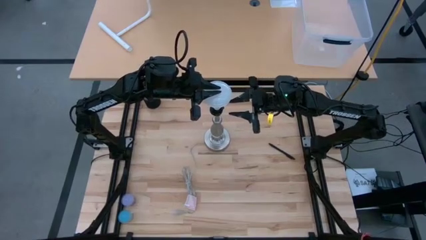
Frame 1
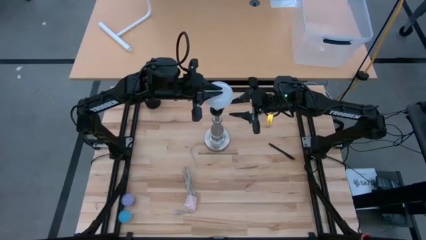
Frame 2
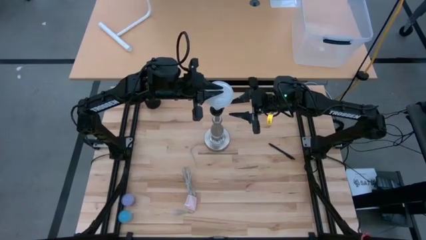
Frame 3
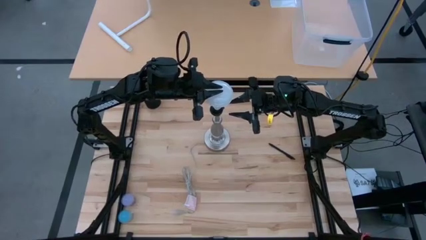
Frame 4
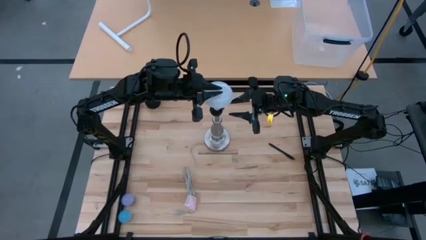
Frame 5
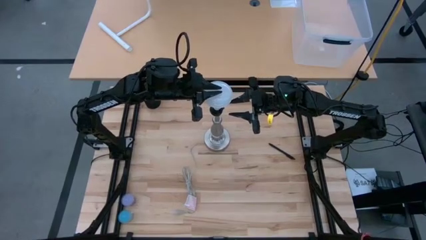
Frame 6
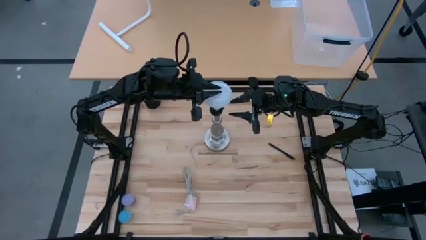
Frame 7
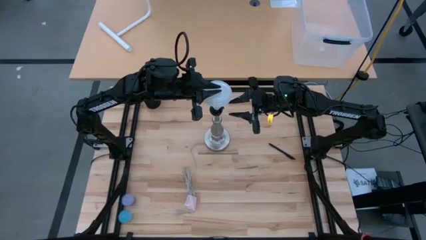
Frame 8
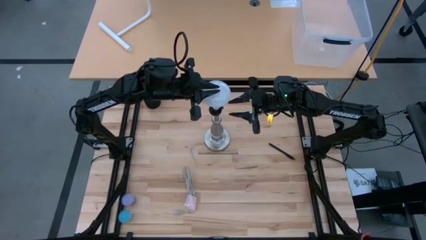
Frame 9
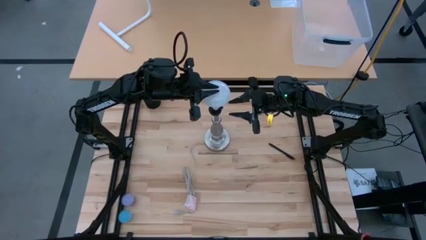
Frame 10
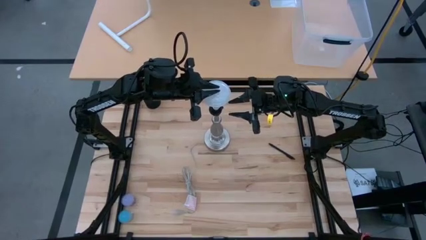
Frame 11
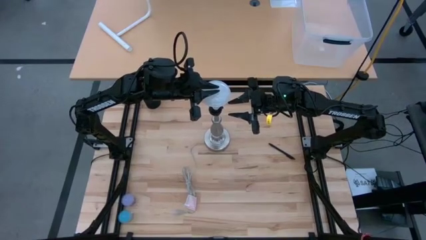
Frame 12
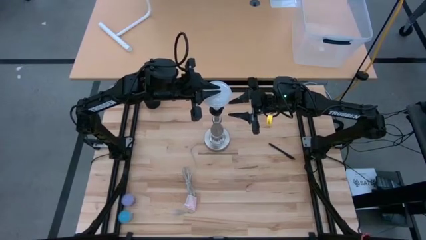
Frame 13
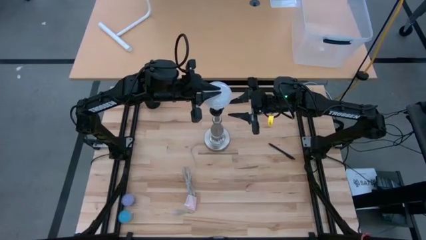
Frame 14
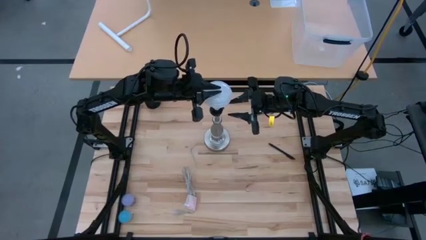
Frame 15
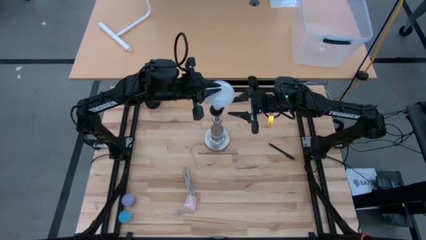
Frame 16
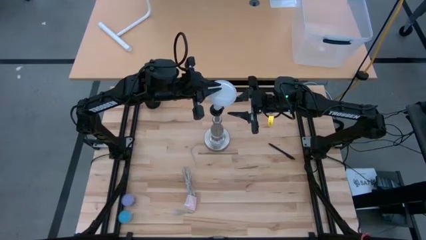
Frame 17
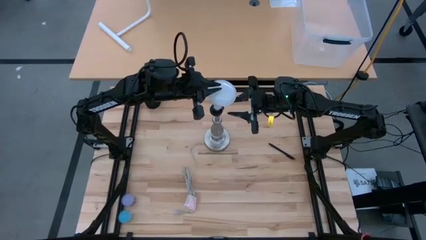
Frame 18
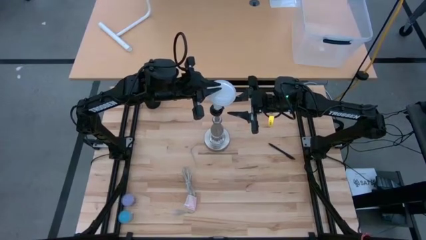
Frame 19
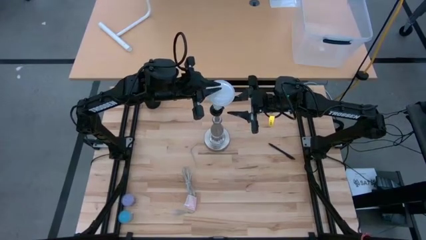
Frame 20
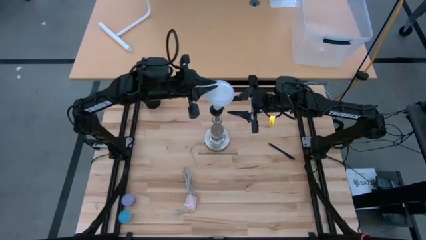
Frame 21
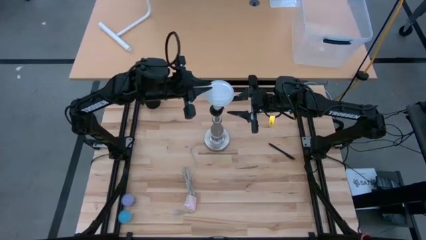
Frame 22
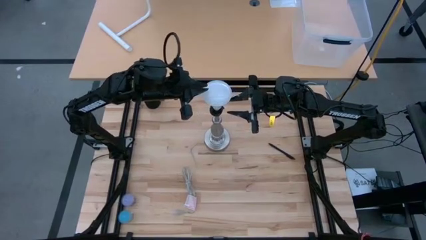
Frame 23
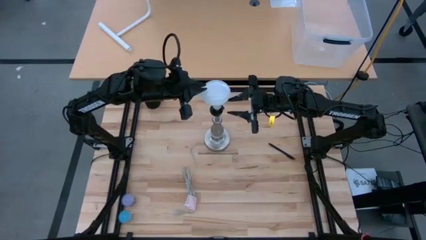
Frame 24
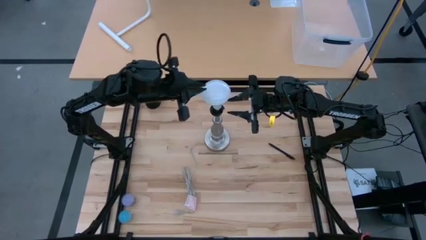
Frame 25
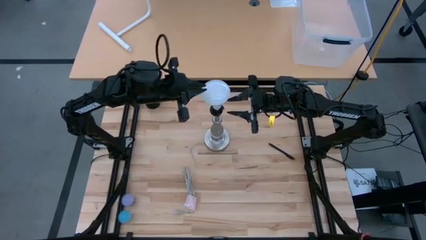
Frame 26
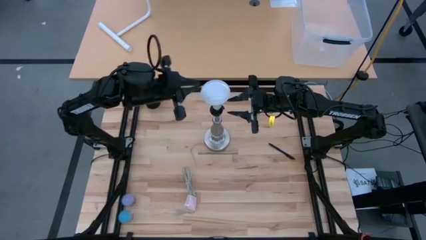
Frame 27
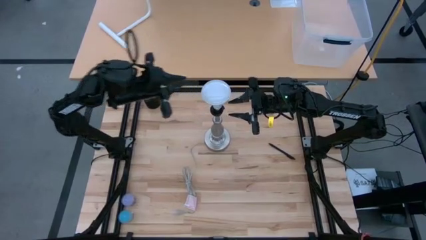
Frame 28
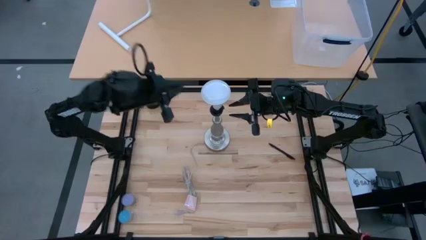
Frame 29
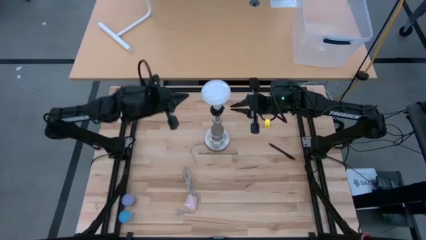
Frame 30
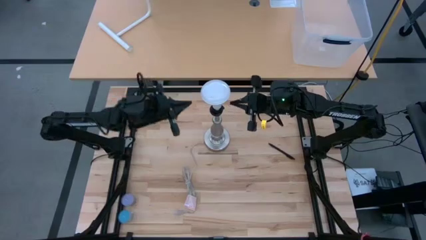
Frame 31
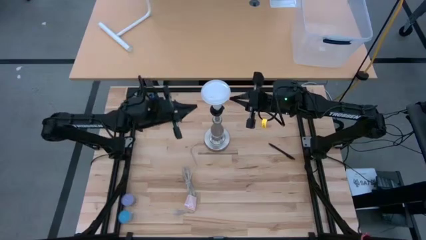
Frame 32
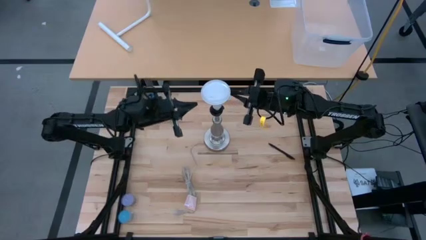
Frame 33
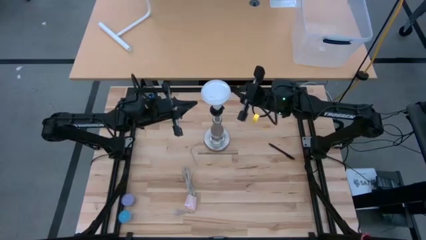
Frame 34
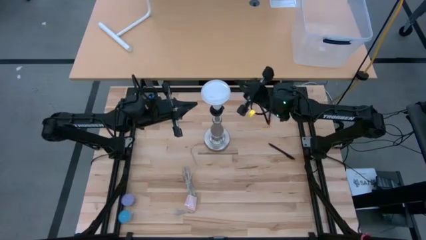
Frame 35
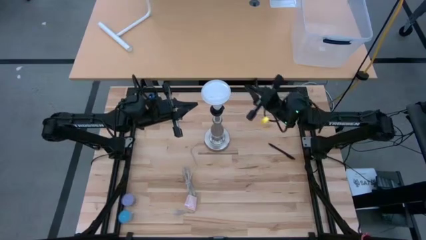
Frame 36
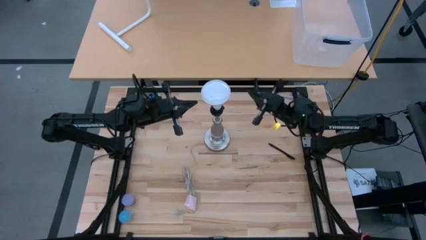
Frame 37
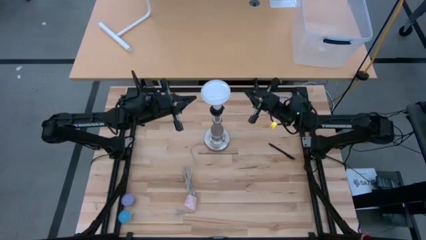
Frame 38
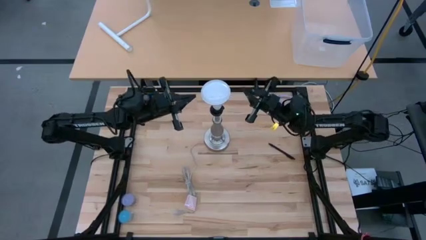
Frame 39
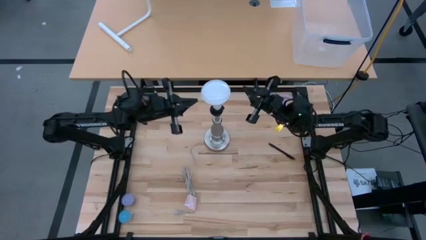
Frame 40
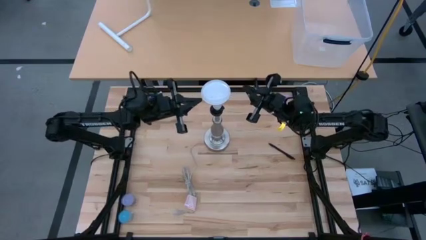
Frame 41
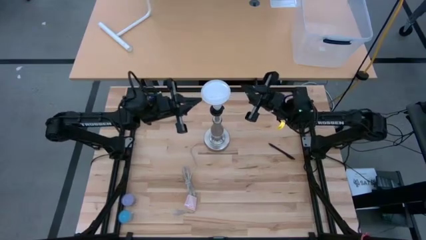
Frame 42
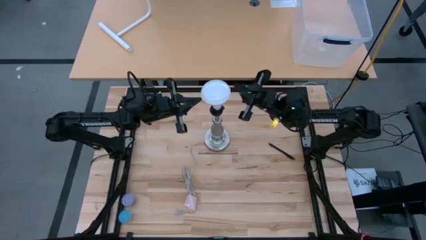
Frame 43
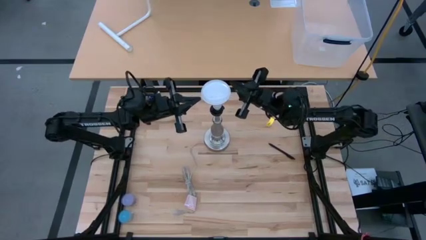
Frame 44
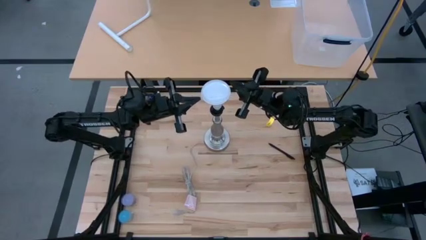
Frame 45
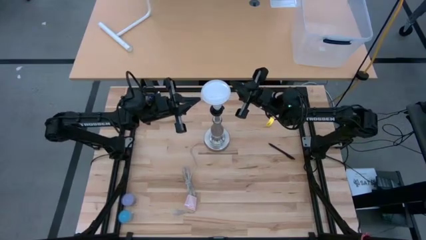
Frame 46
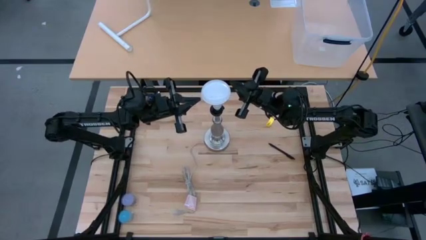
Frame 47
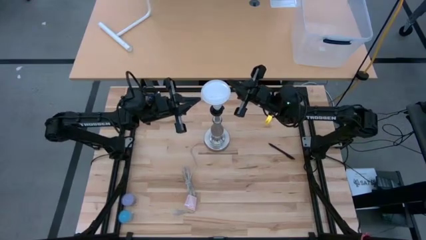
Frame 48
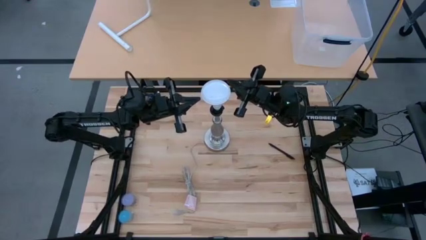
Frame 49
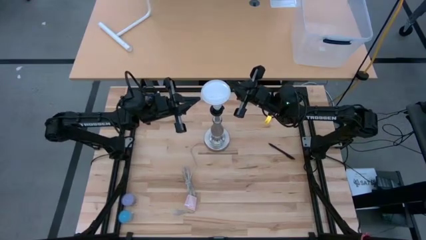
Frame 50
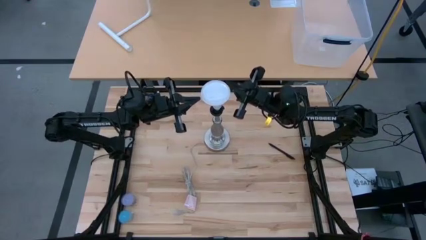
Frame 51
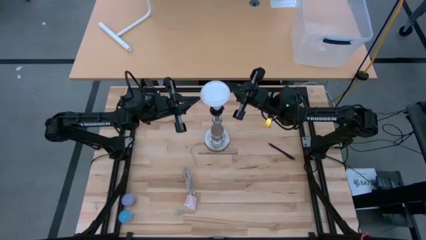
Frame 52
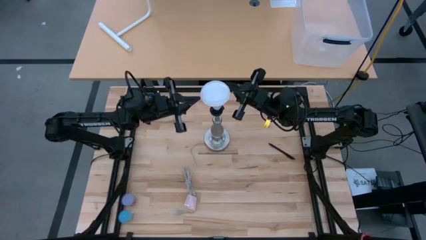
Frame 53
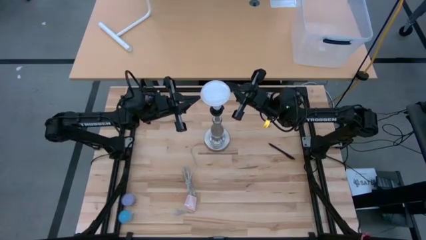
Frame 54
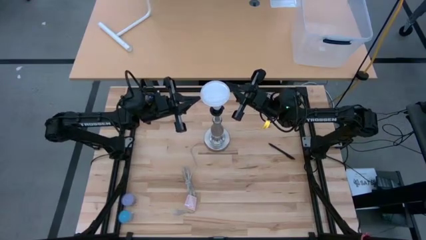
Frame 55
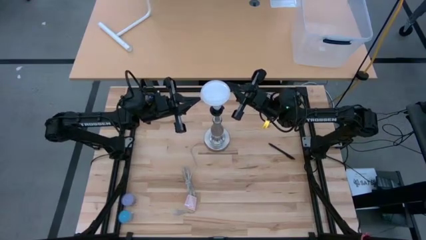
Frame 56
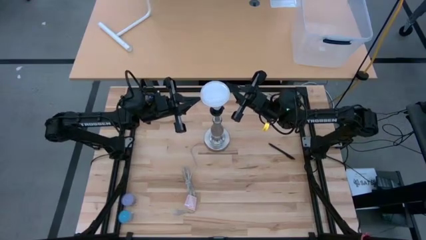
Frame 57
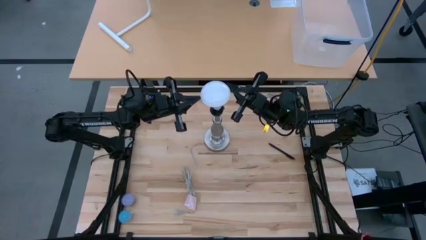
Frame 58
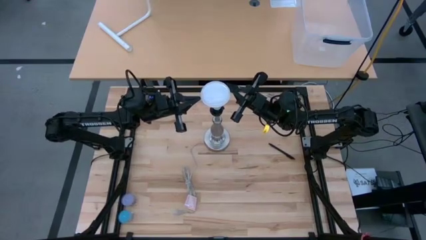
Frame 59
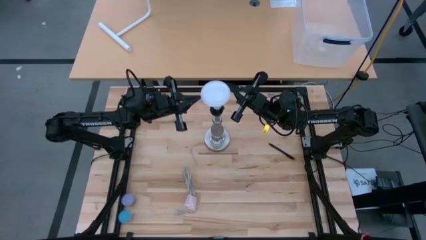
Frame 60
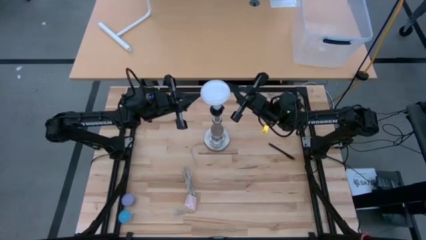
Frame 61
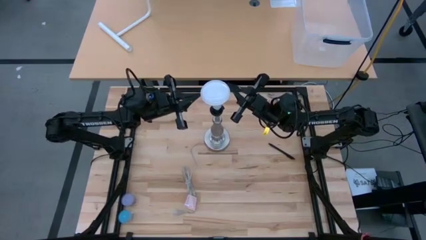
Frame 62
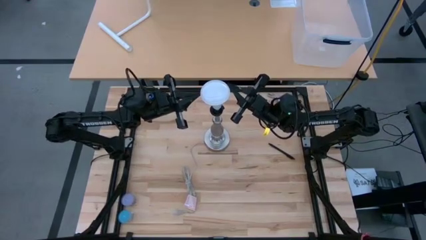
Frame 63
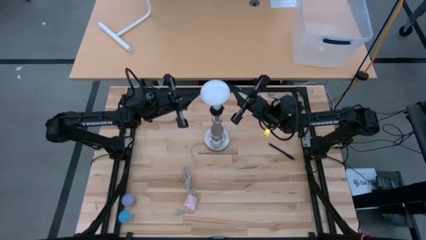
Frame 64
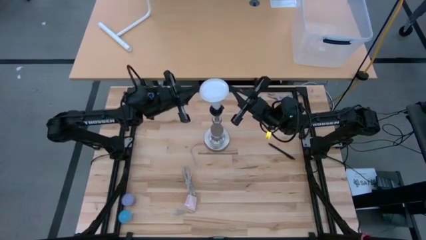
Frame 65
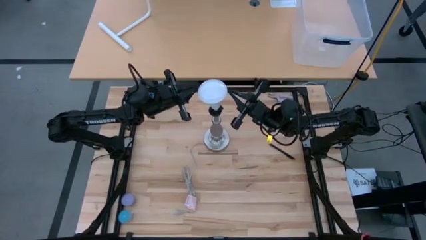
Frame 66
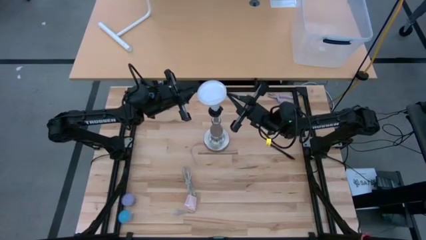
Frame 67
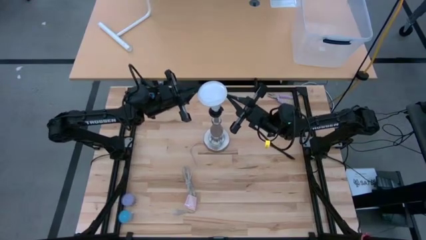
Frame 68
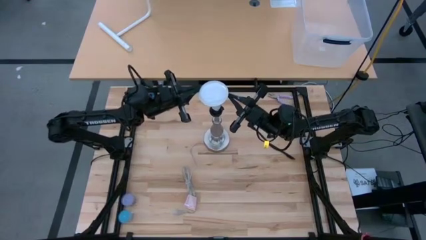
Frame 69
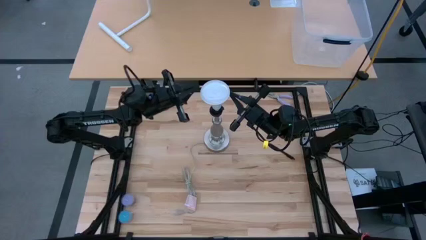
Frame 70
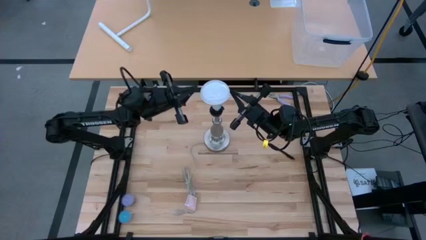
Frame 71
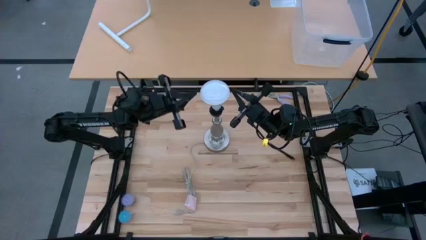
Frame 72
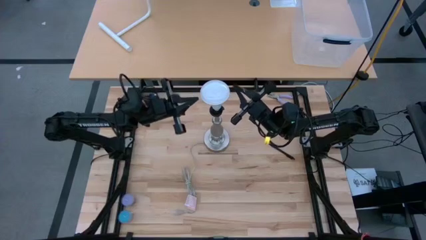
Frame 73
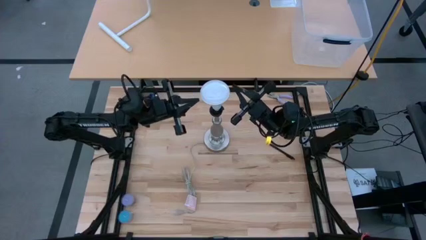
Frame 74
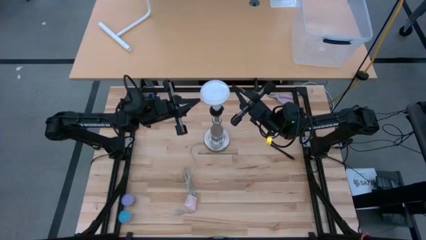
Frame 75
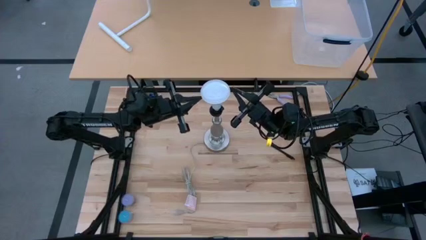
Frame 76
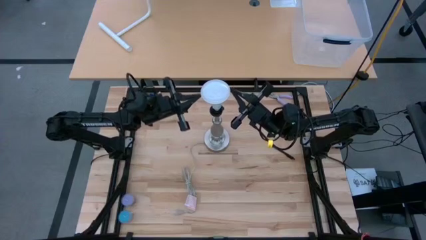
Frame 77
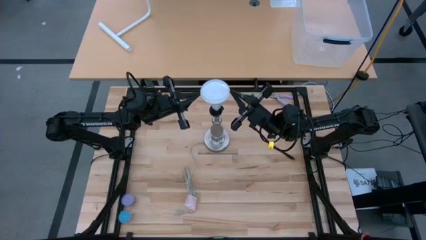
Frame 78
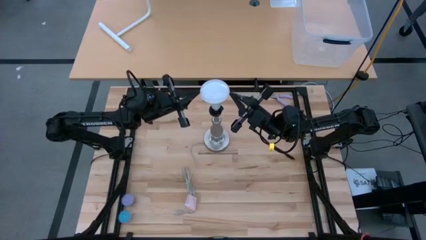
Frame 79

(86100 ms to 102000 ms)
Task: Screw lightbulb
Insert the lightbulb into the lamp
